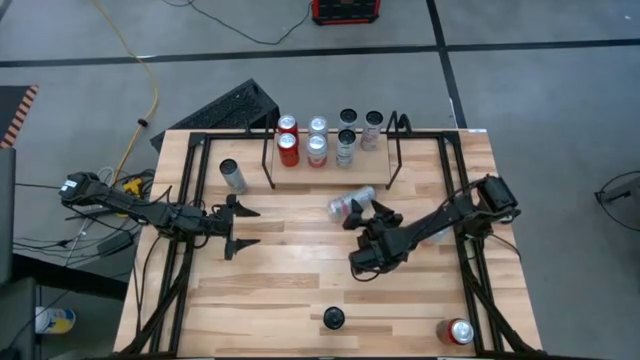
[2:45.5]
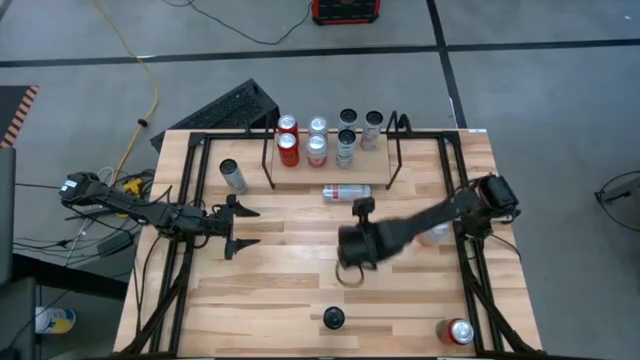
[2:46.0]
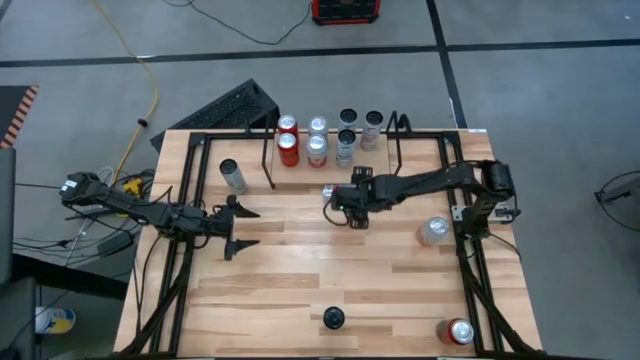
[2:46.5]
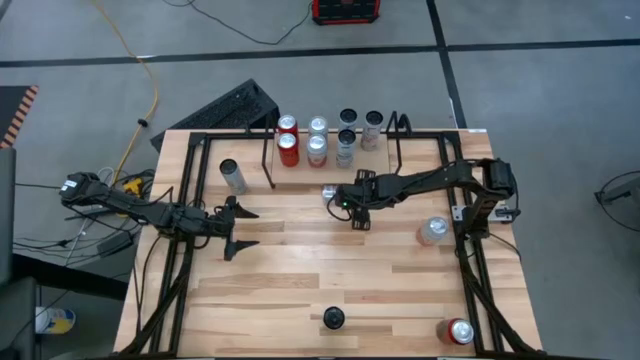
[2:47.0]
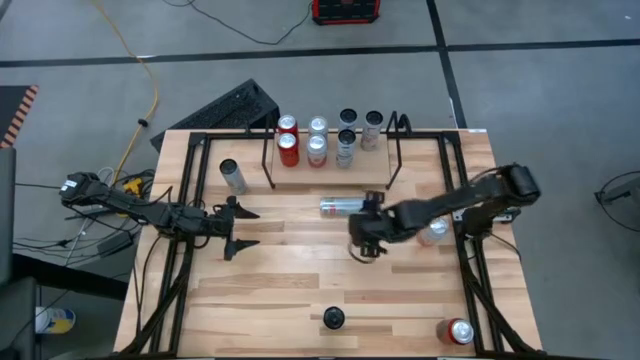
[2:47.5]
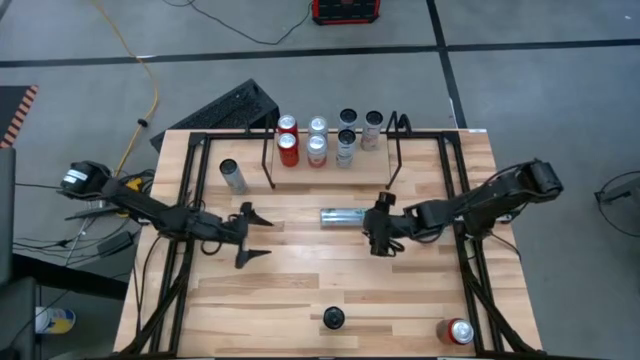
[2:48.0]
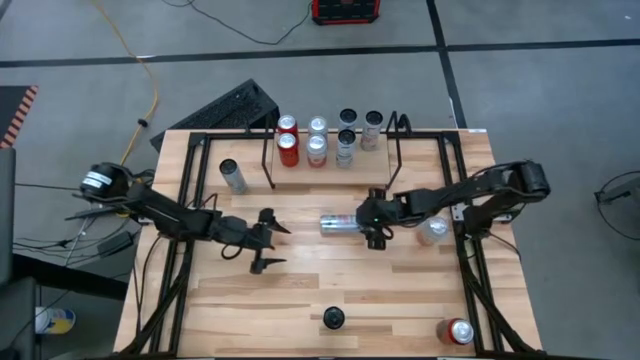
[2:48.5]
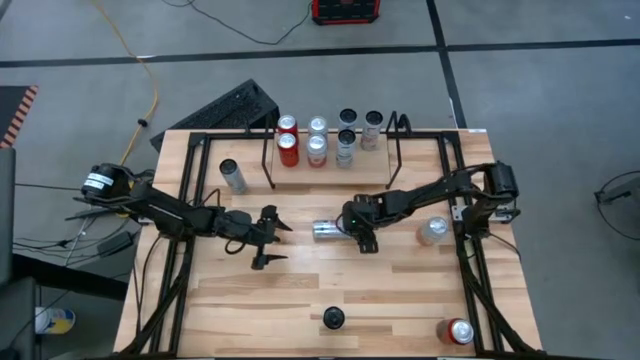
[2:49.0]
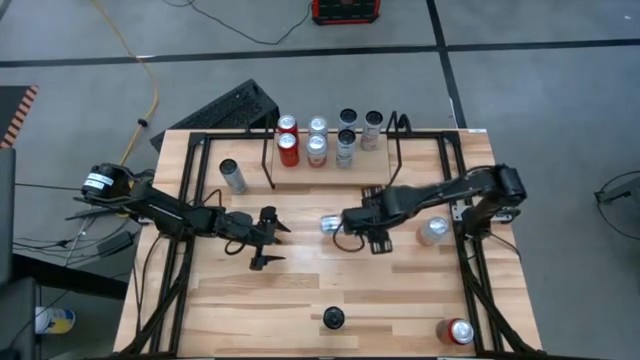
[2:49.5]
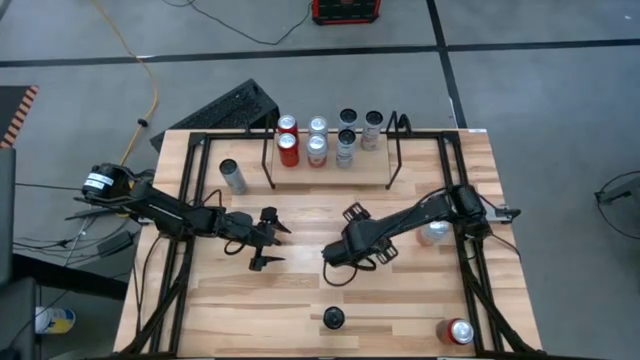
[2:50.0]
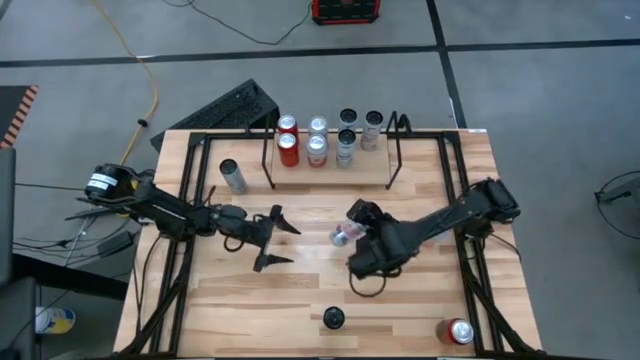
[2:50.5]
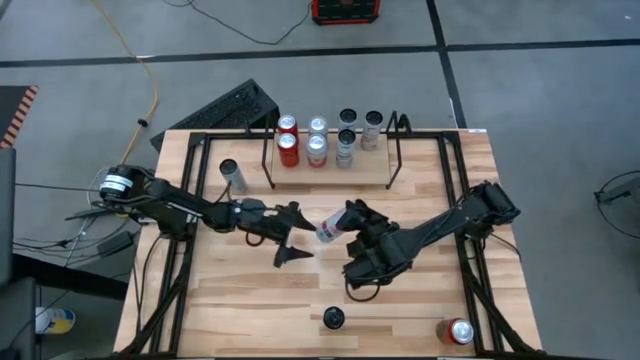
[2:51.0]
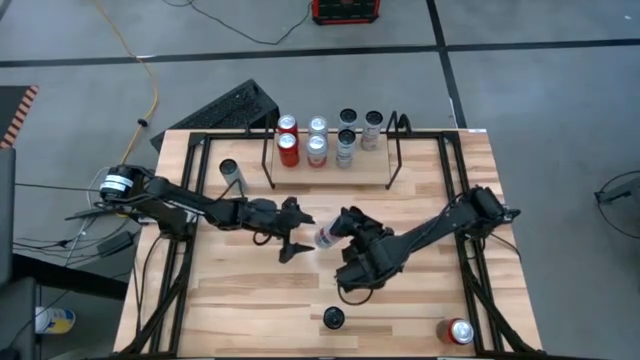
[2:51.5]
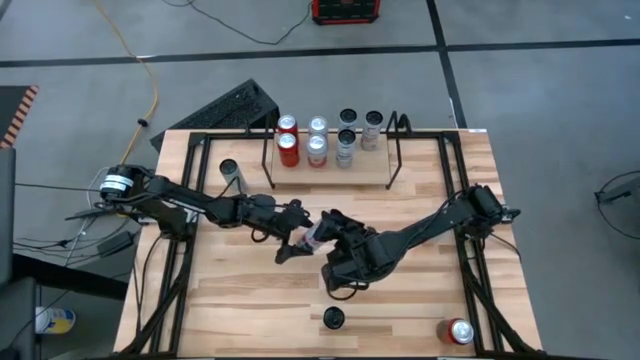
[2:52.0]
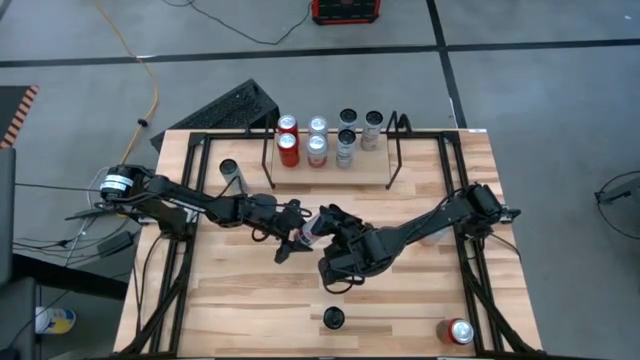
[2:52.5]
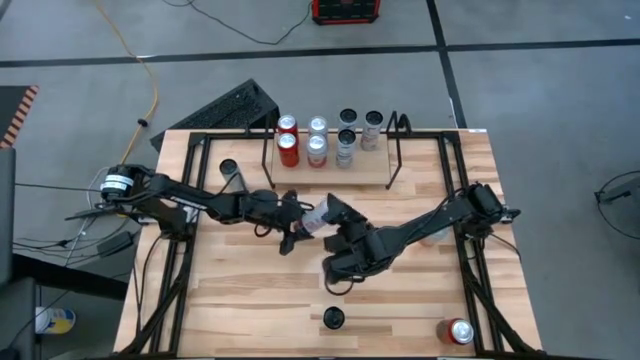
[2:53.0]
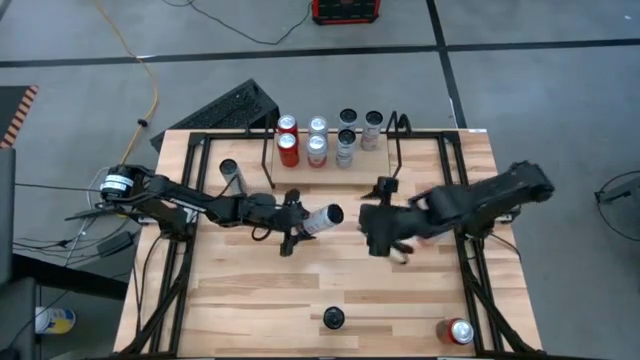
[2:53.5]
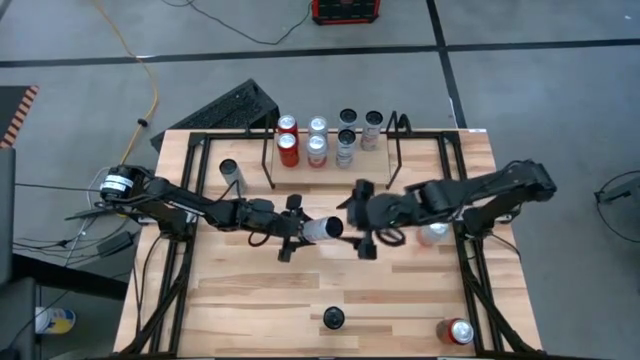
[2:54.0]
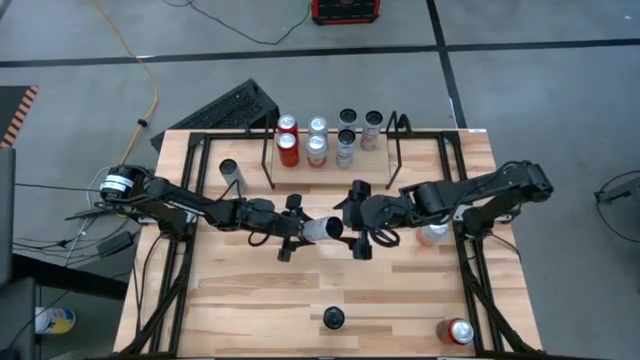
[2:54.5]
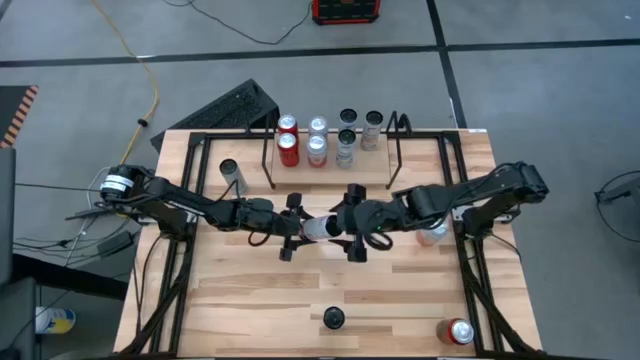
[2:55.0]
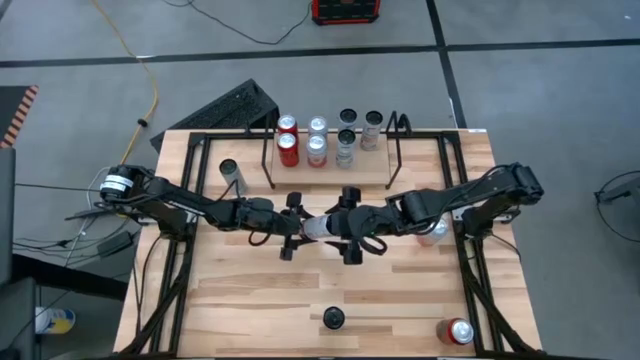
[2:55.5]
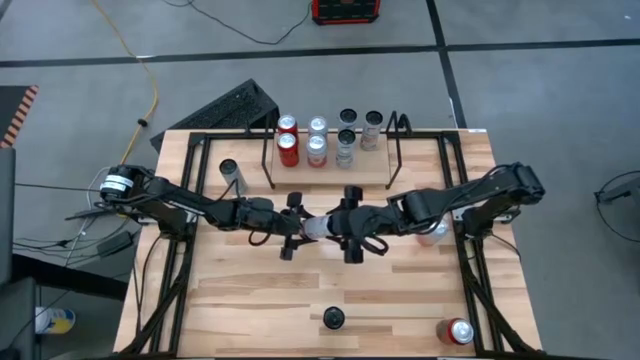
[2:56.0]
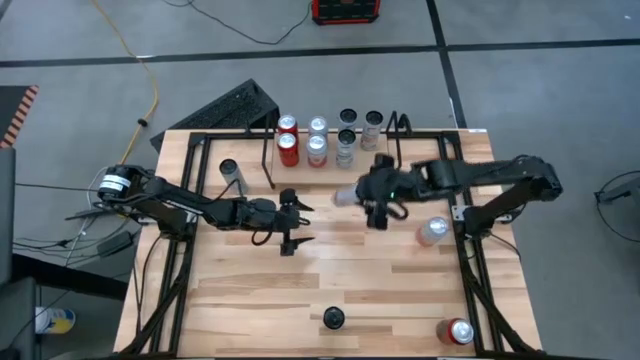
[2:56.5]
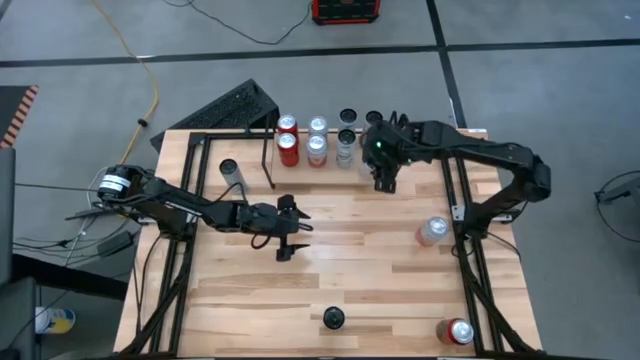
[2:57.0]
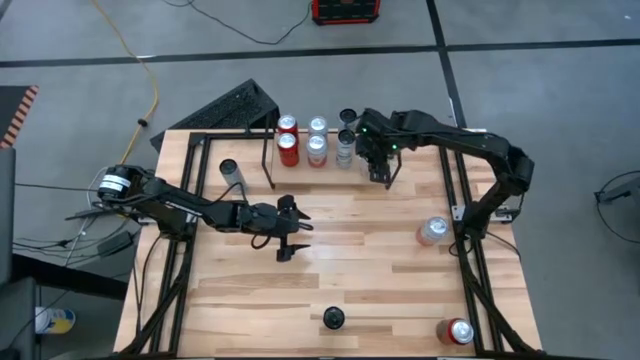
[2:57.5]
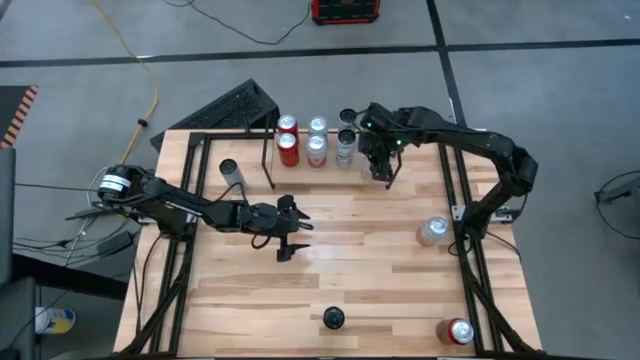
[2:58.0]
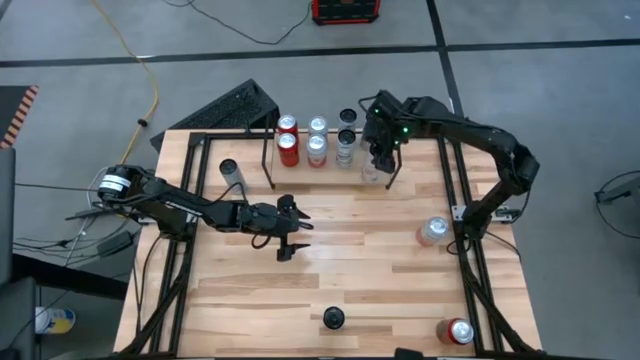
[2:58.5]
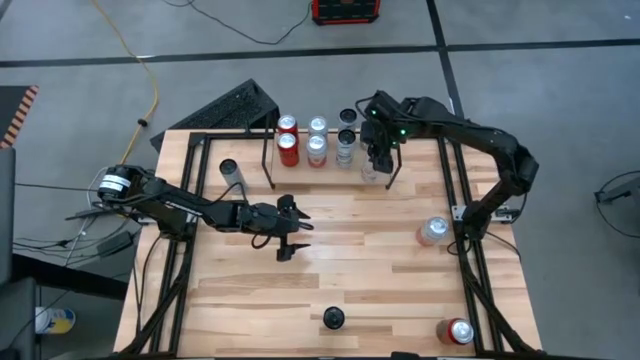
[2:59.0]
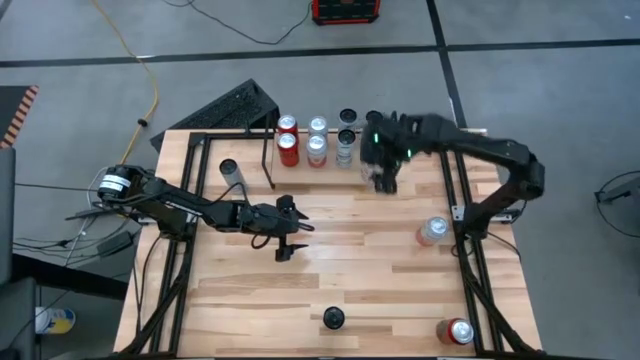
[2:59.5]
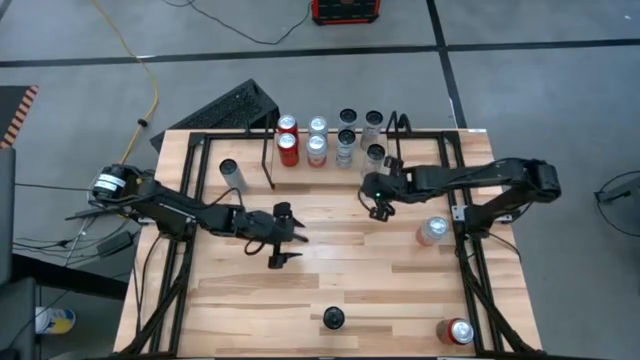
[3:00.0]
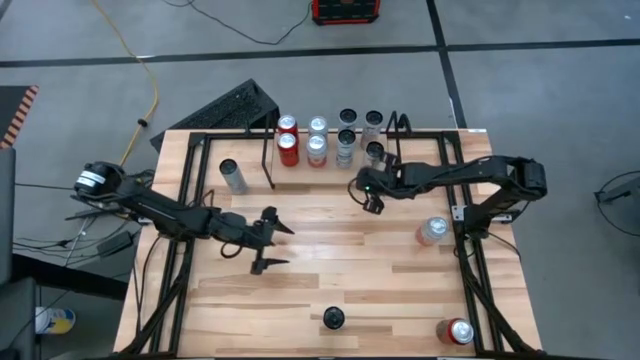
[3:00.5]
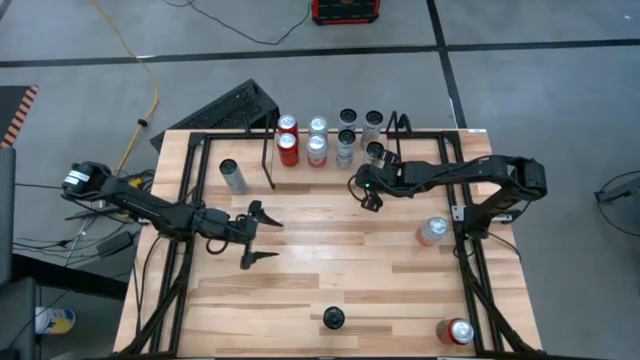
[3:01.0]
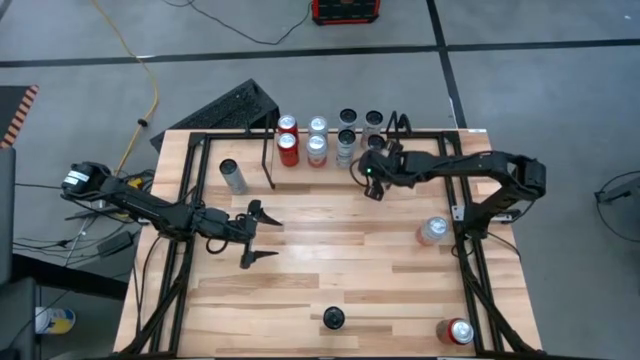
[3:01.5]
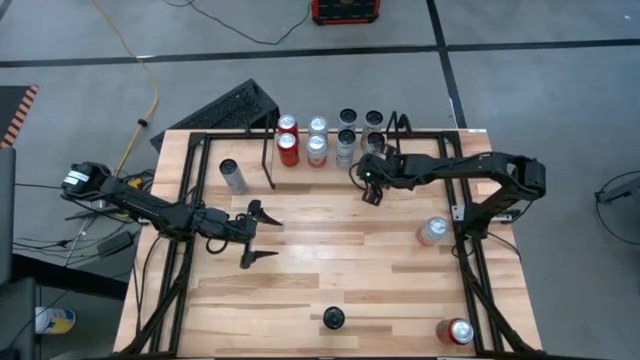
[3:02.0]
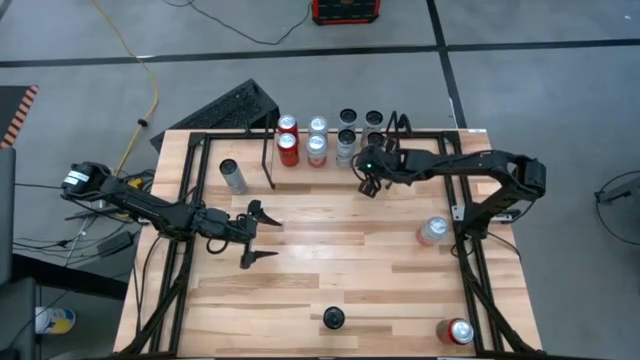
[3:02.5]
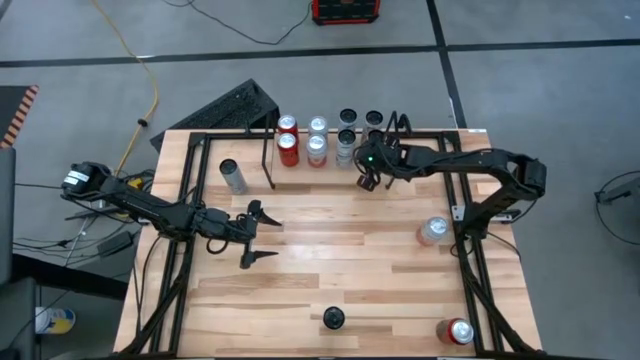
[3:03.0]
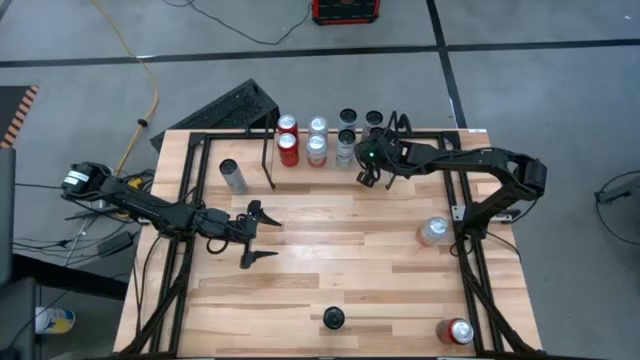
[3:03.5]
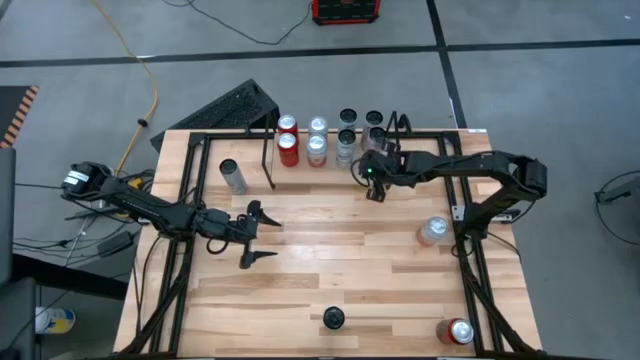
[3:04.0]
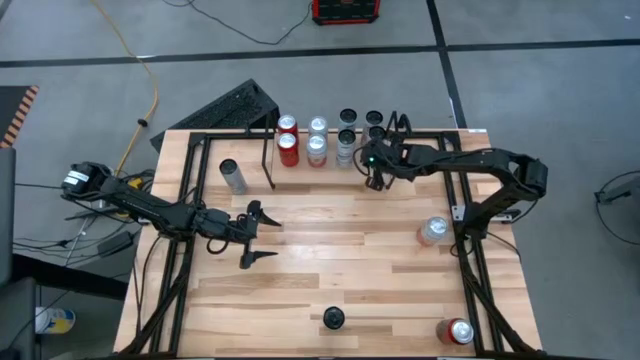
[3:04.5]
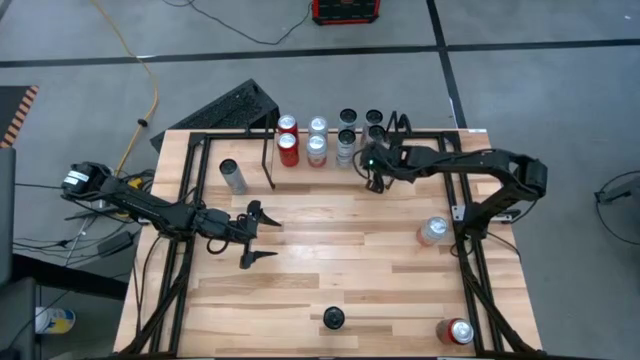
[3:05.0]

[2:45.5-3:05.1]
Task: Place canned beverage on shelf
Put the right white pink soda can on the shelf and align with other white pink soda can

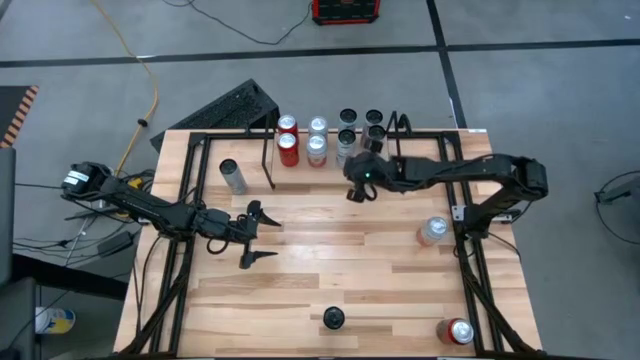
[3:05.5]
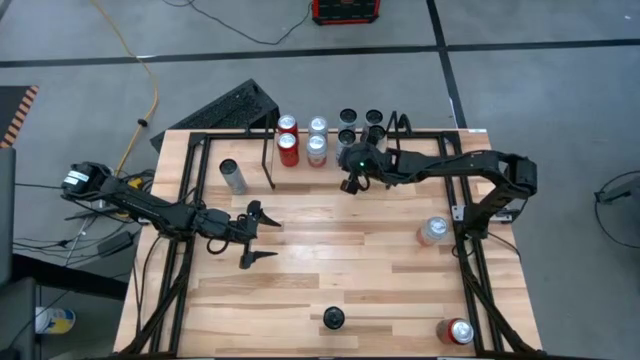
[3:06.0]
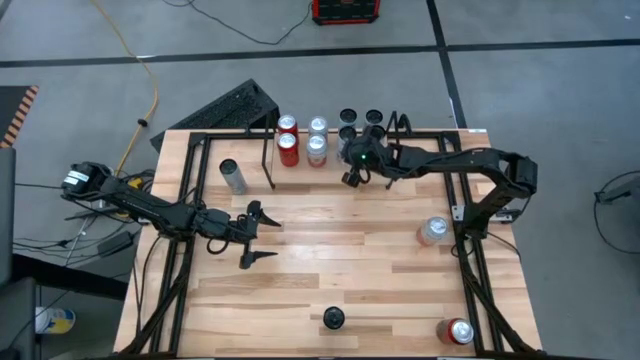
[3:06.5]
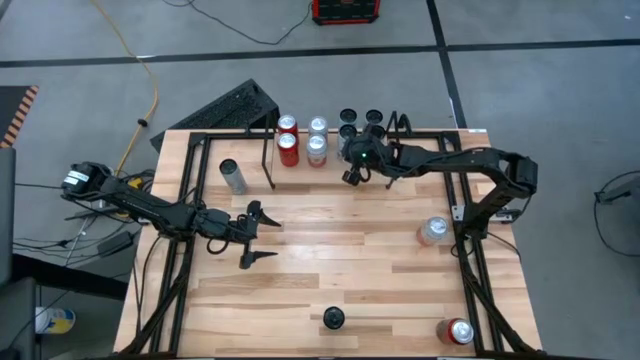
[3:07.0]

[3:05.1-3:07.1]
Adjust the white blue soda can on the shelf

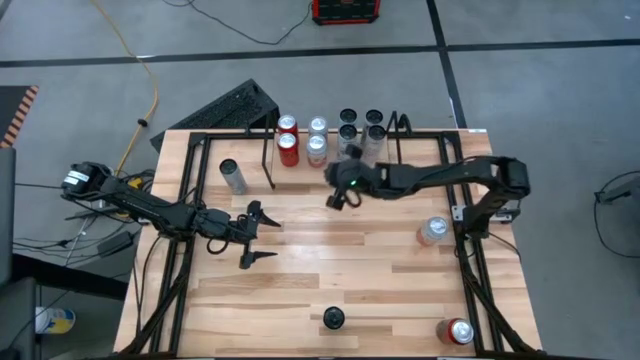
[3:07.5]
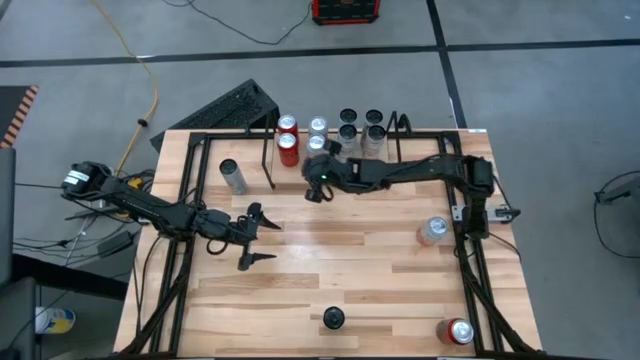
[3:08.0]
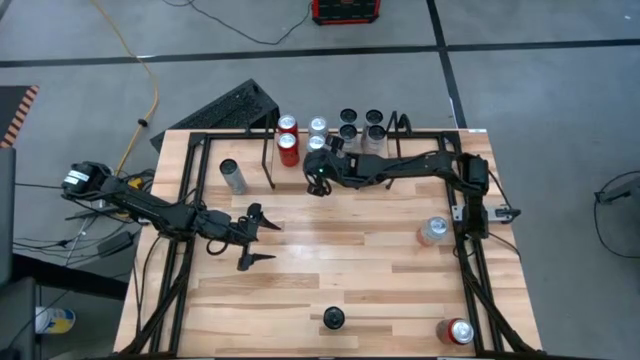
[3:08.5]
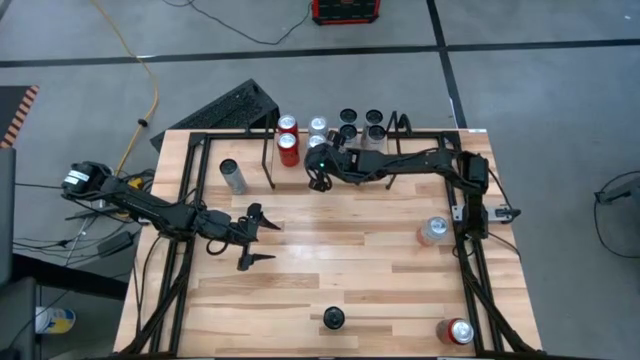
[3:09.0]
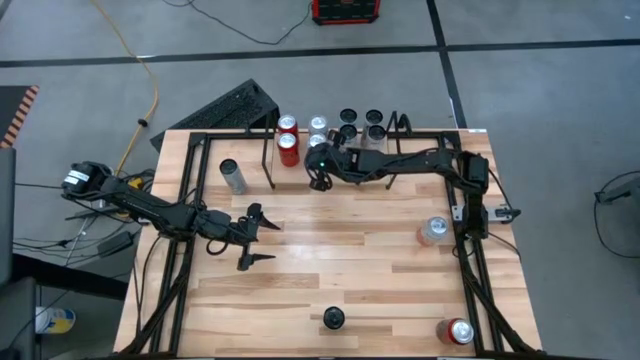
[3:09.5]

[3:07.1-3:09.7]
Adjust the pink white soda can on the shelf
